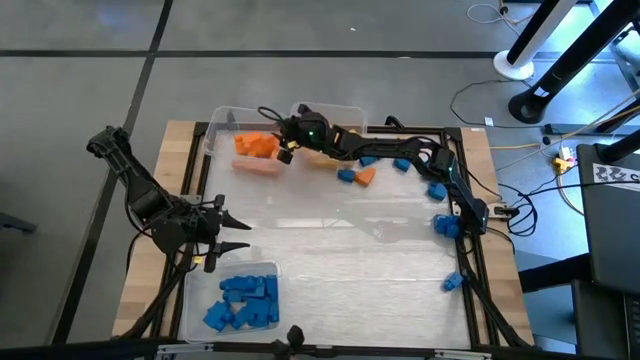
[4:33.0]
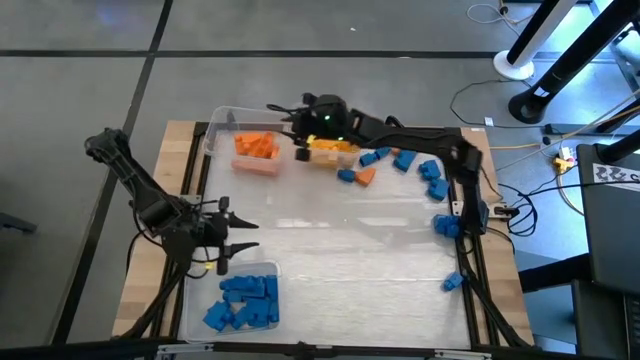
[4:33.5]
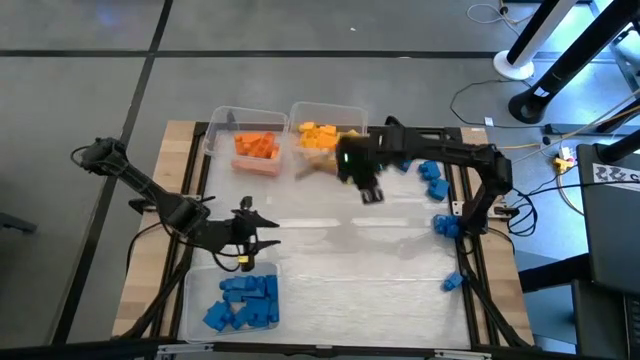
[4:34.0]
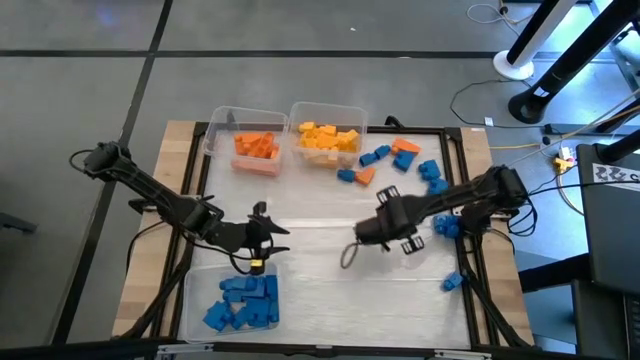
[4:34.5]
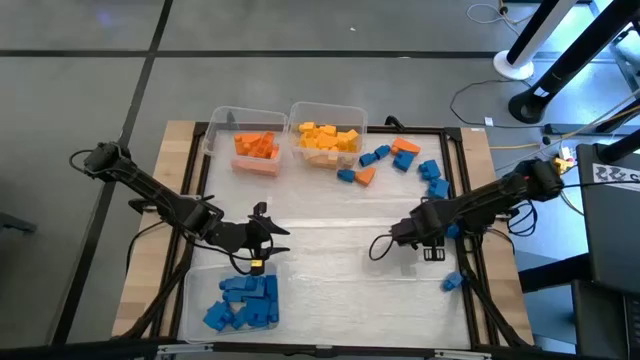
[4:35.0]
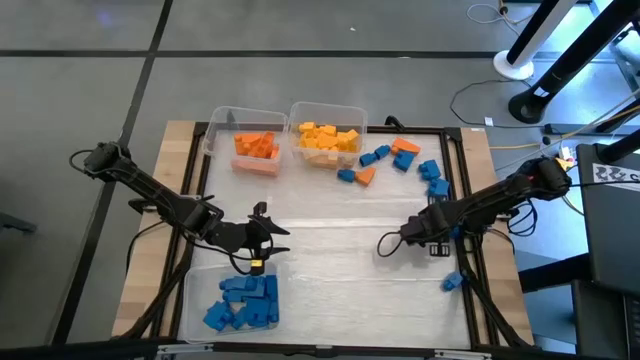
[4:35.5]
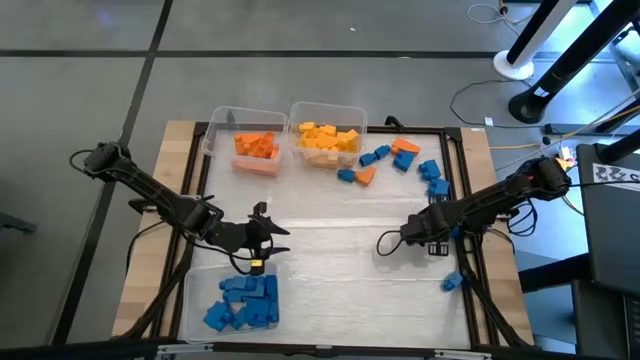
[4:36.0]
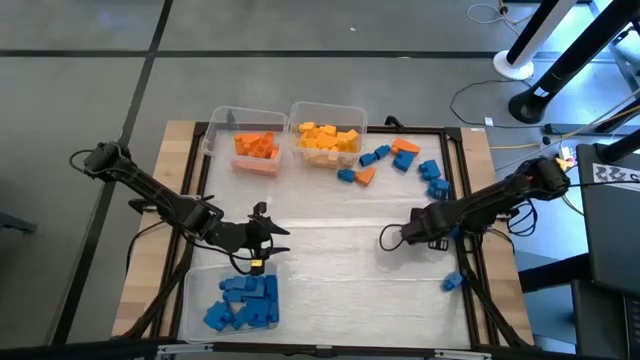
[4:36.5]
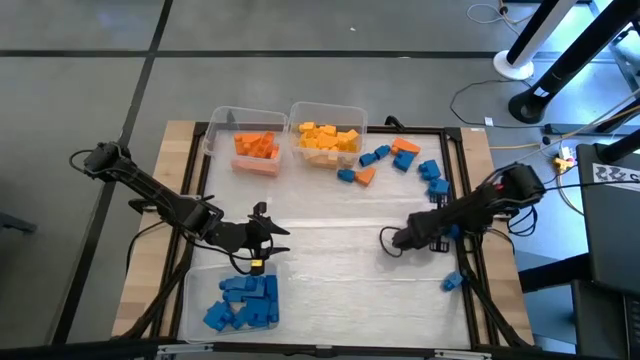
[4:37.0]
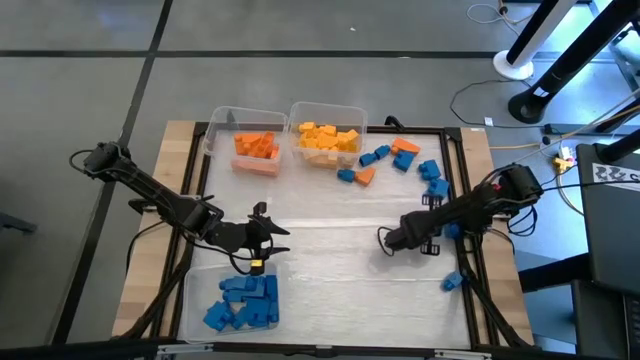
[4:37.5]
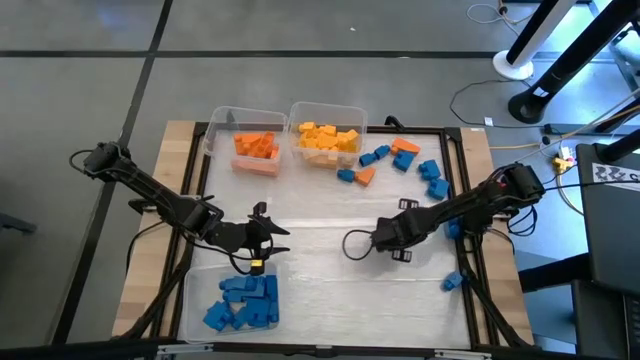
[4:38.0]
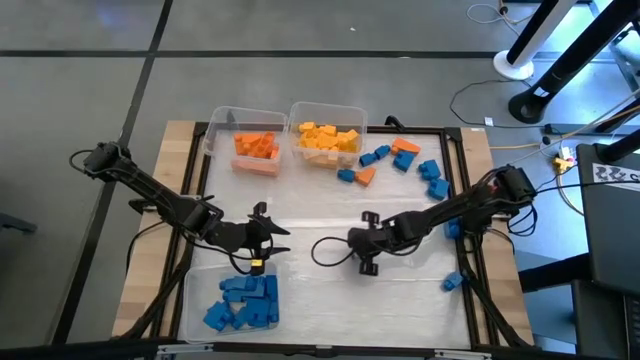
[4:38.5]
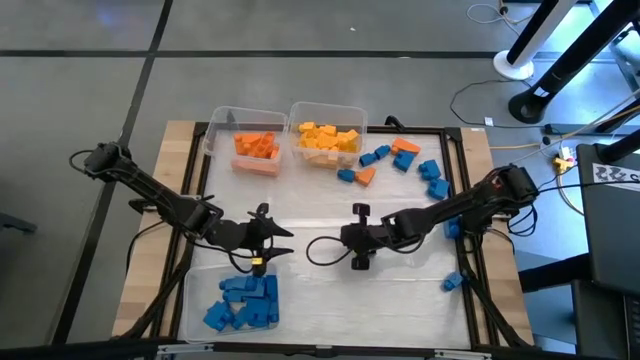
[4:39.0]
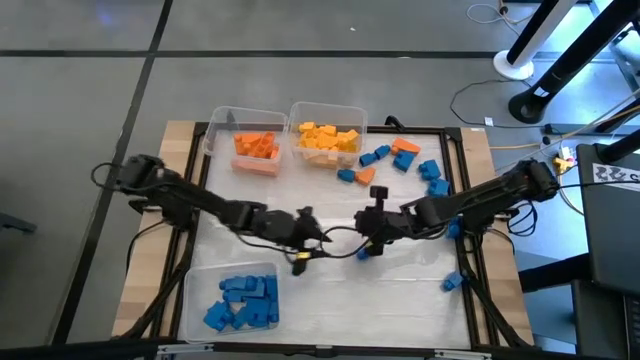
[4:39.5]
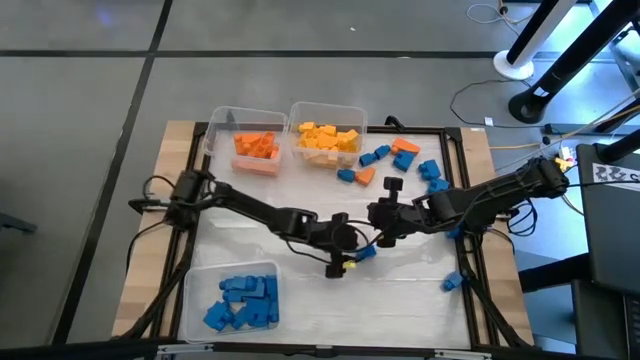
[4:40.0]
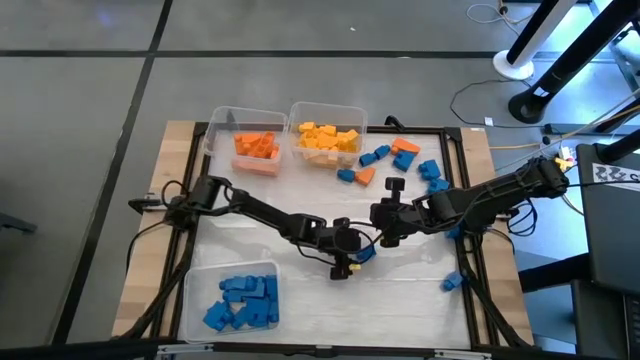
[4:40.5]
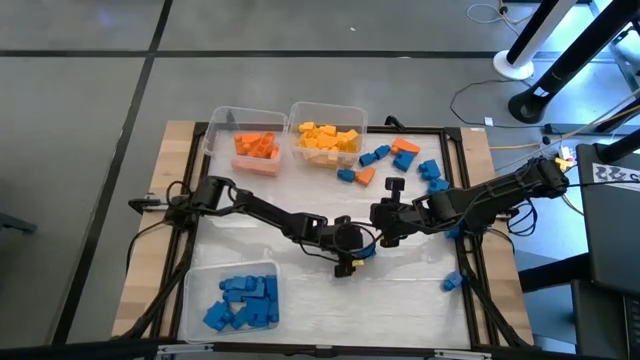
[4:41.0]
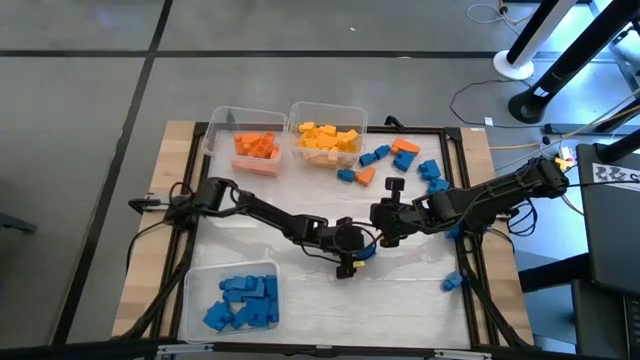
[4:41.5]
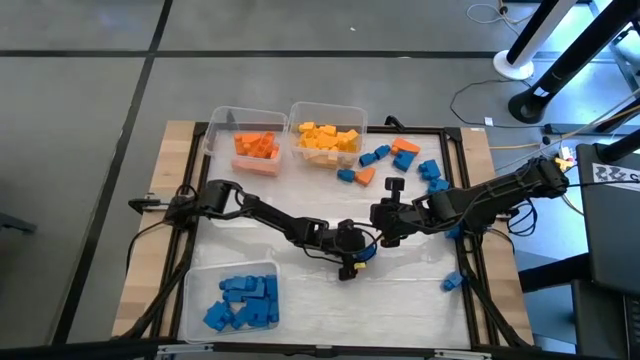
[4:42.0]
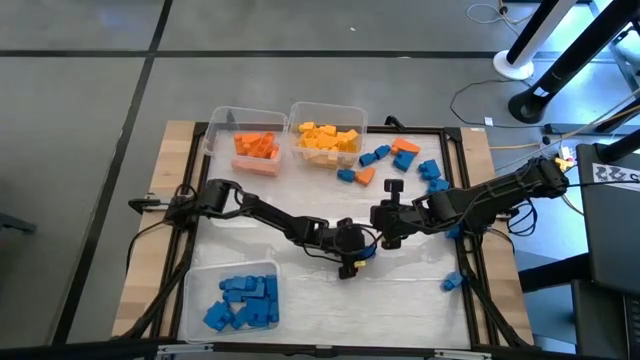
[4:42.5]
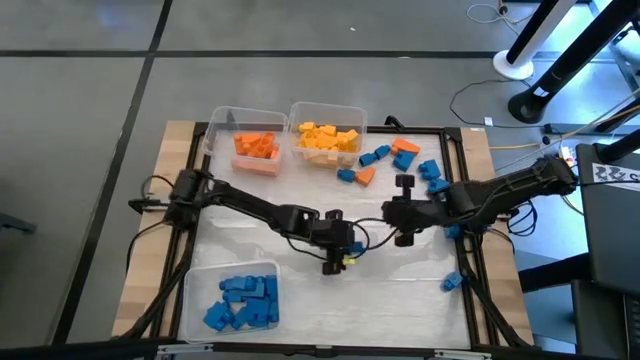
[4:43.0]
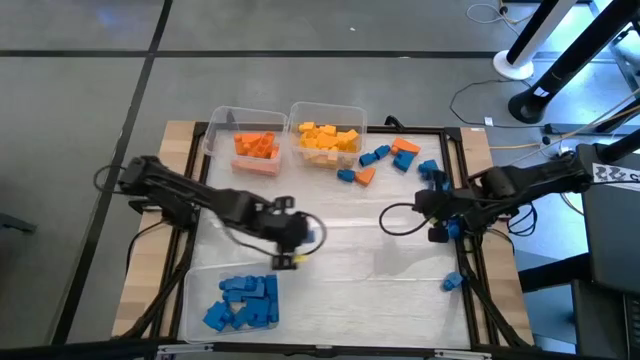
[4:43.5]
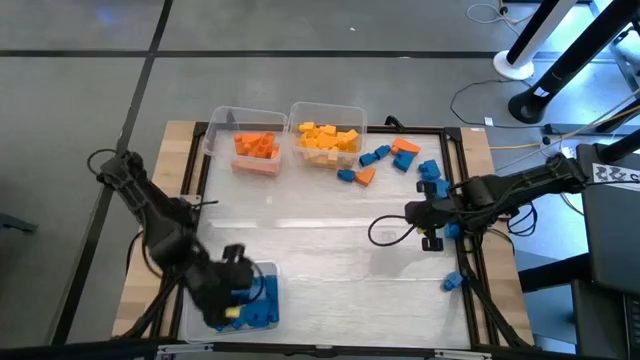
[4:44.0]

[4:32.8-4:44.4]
Task: Sort blocks
Put the blue game piece into the bottom transparent bin

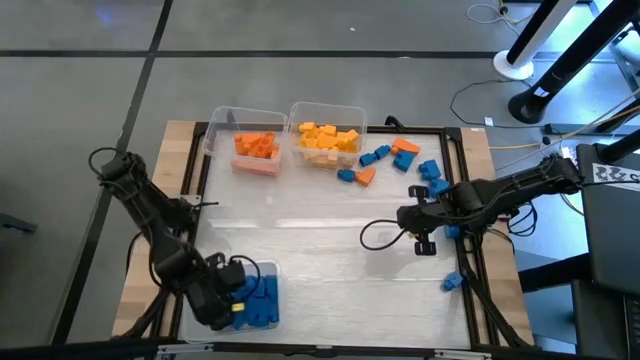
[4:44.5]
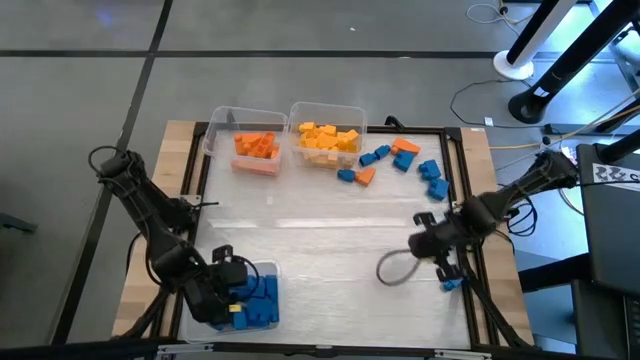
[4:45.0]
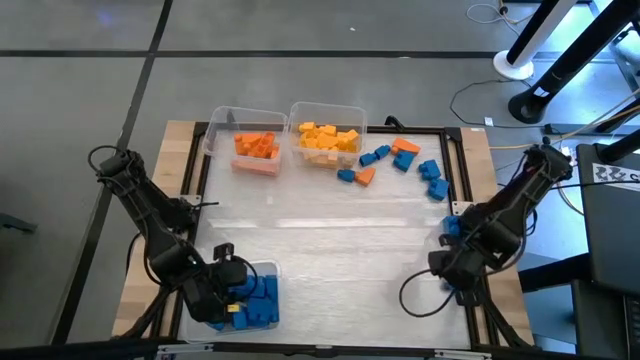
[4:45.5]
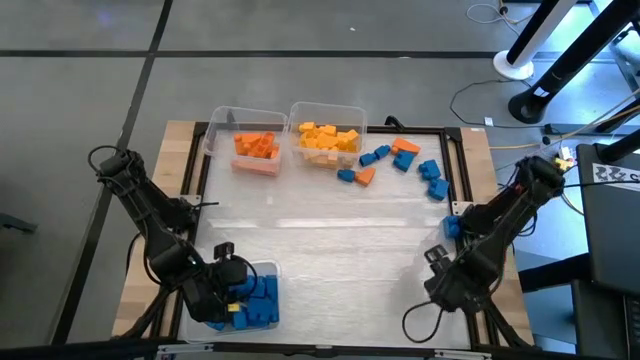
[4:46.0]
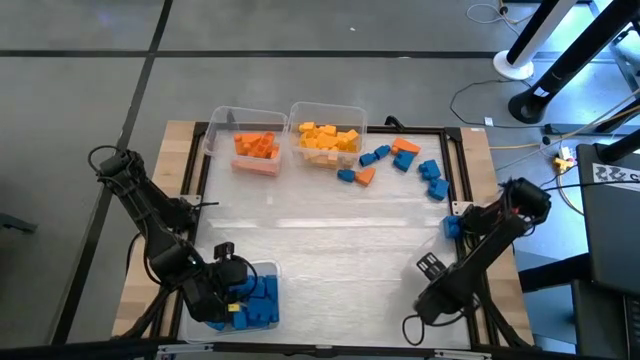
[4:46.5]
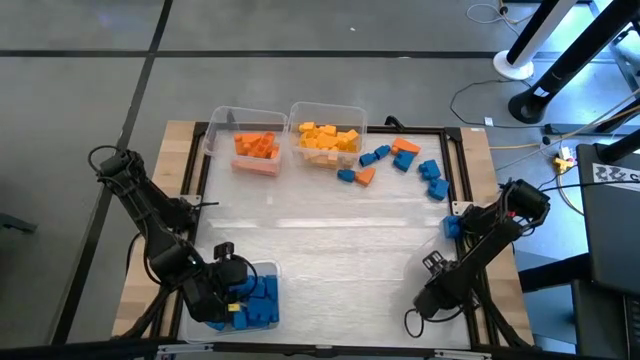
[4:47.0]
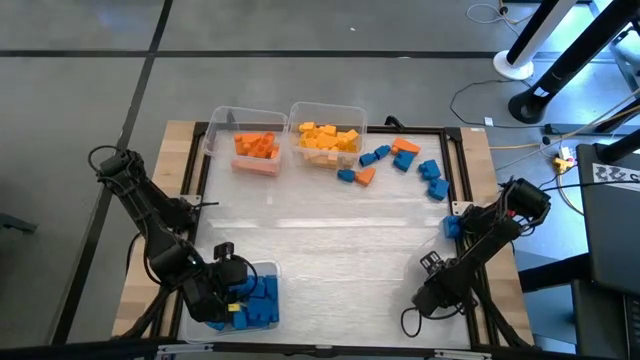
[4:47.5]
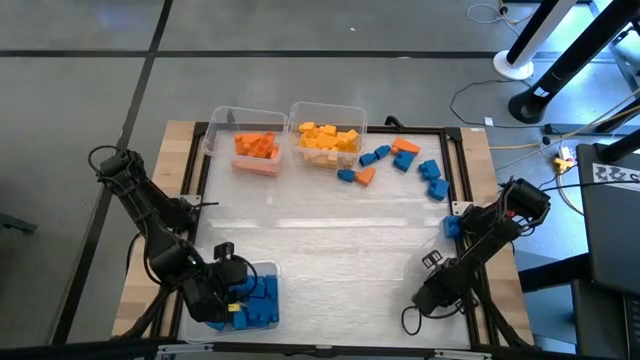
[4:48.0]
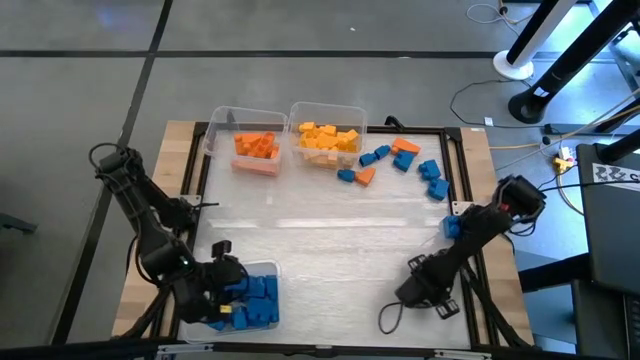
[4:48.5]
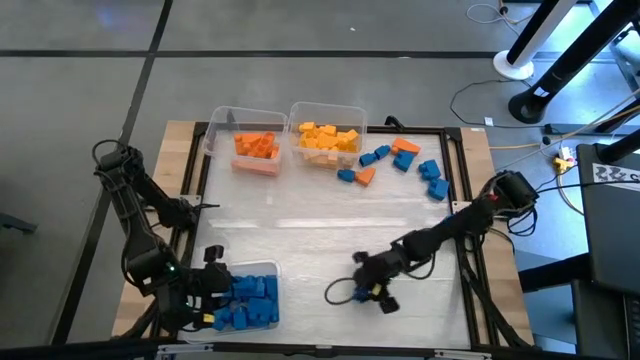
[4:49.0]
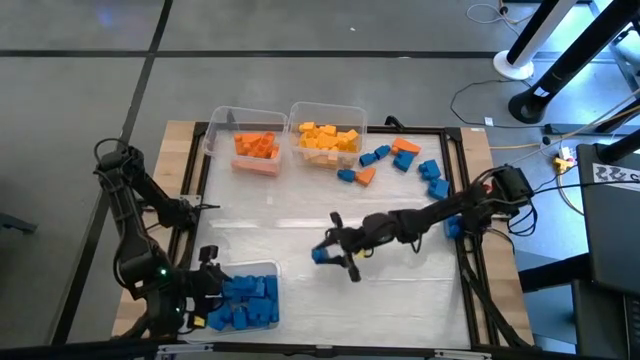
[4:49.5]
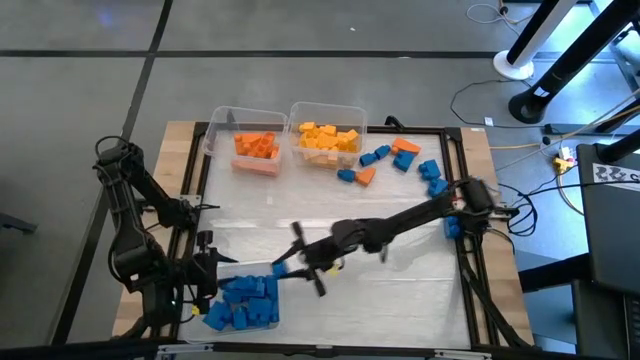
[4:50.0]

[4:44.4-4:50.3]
Put the blue game piece into the bottom transparent bin

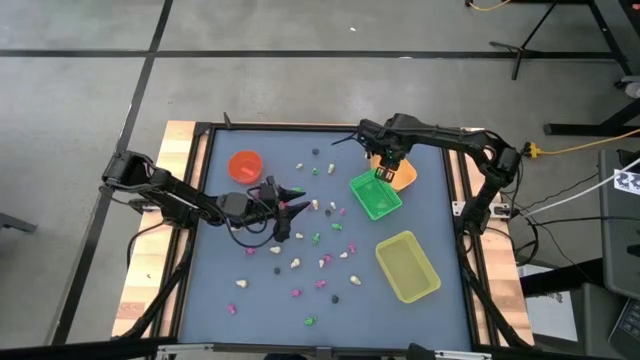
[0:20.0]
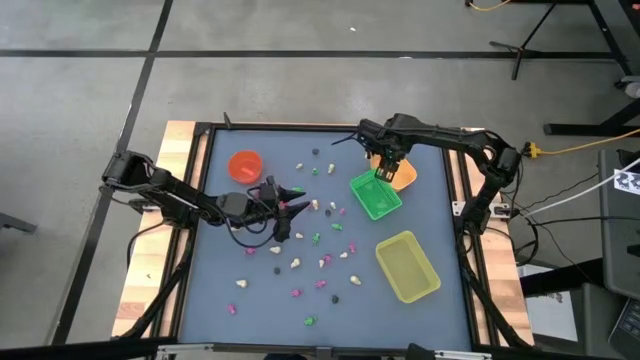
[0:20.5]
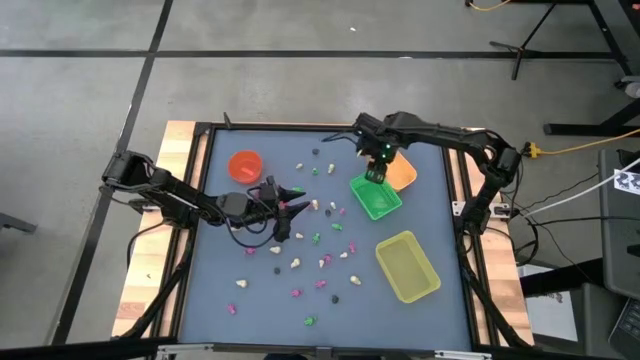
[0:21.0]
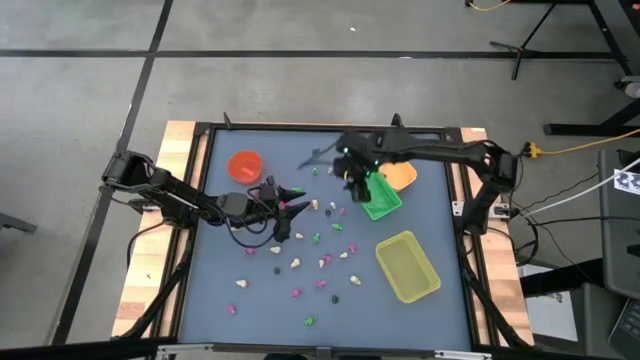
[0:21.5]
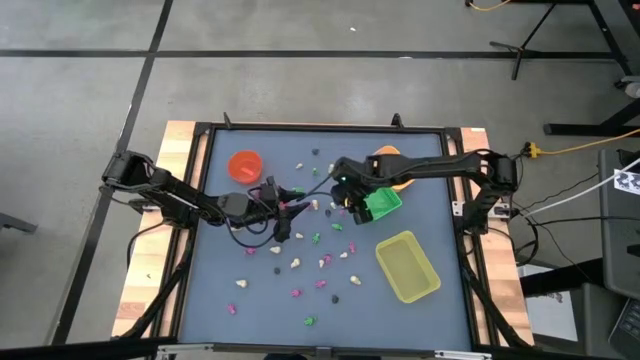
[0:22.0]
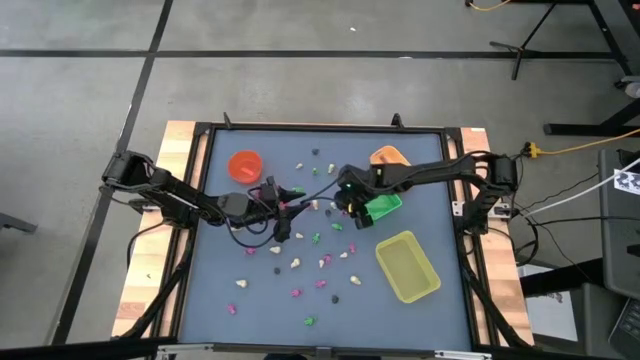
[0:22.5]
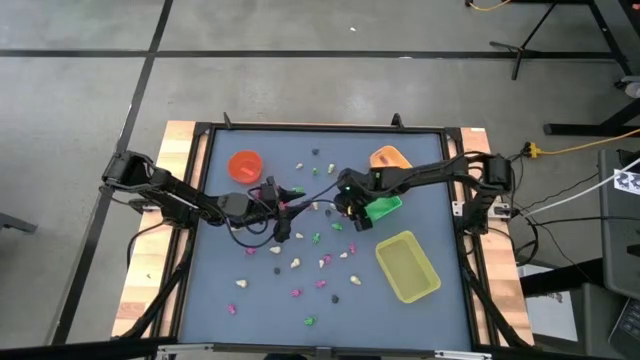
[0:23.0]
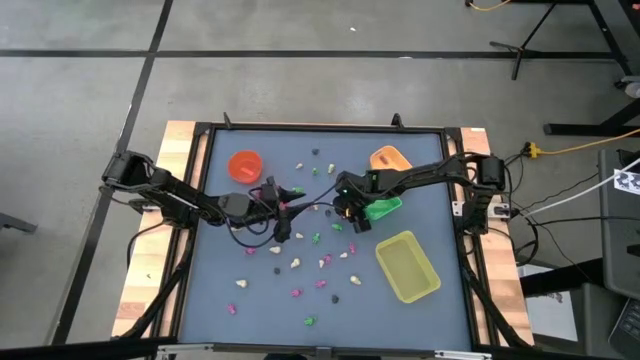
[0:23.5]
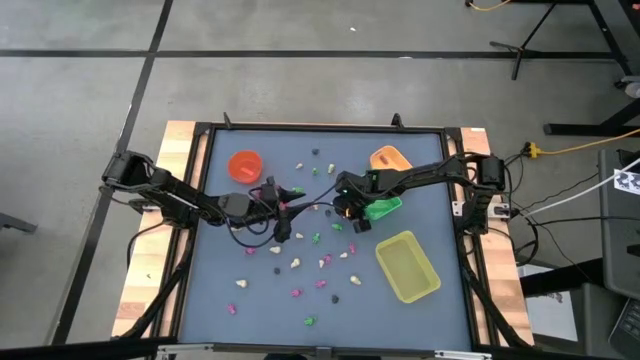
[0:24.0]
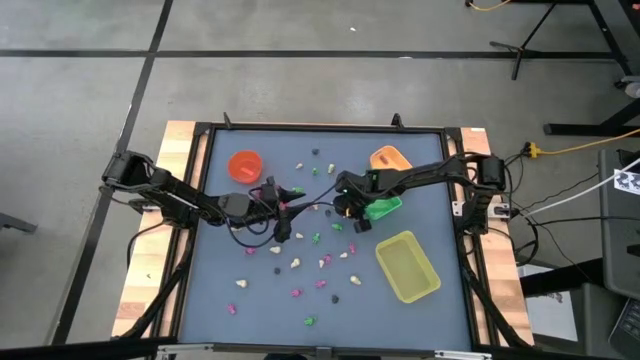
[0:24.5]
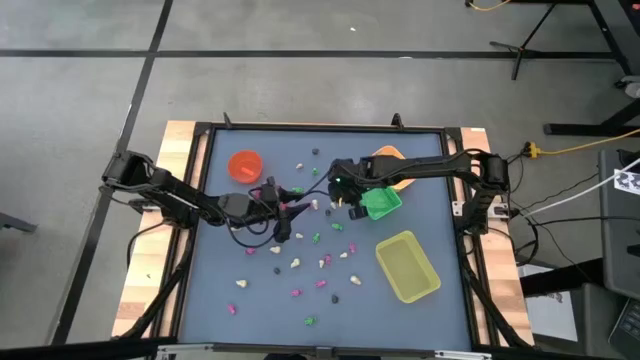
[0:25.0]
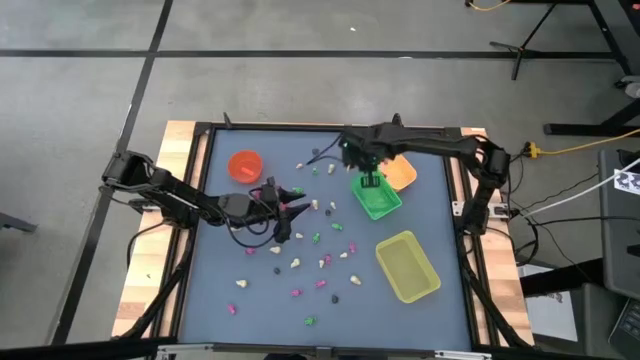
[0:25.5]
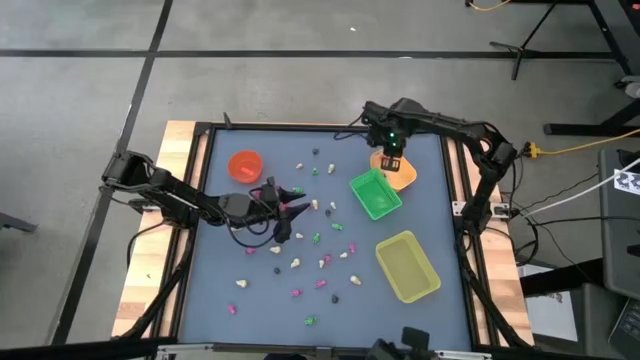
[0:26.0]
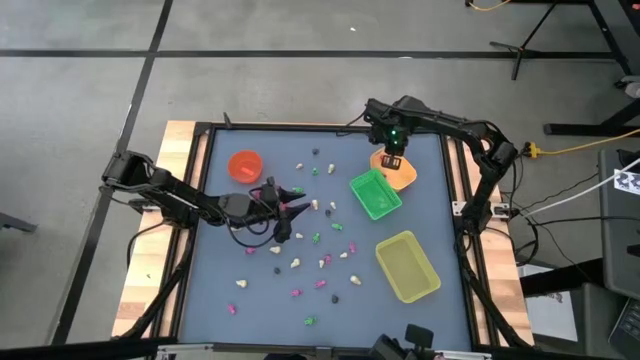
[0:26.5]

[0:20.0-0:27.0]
Task: Sort Halloween decoration
Put the pink skeleton toy into the yellow bin
